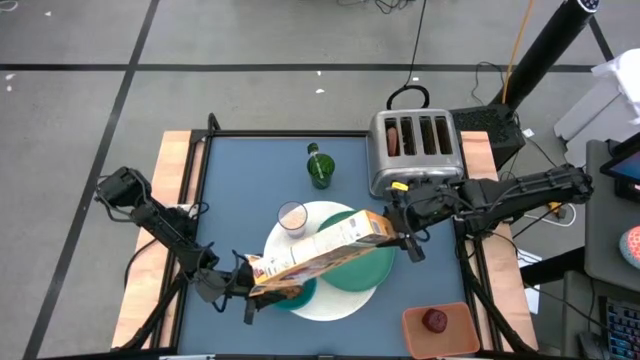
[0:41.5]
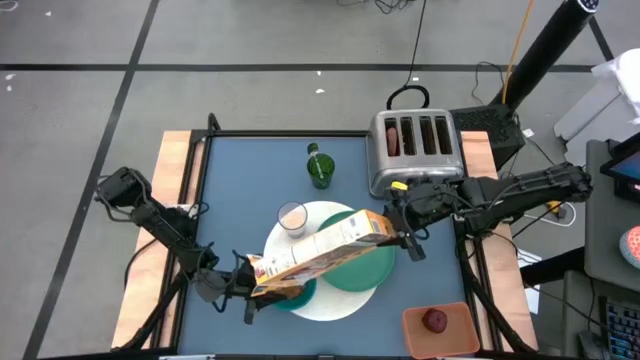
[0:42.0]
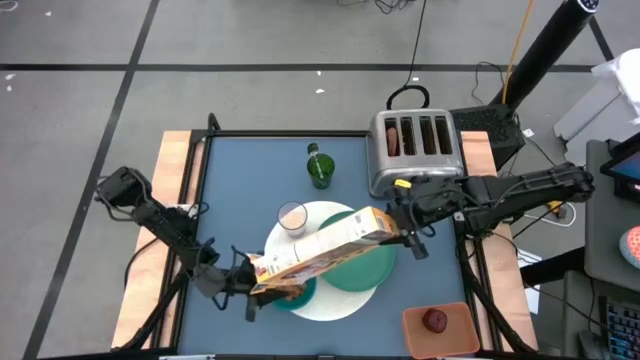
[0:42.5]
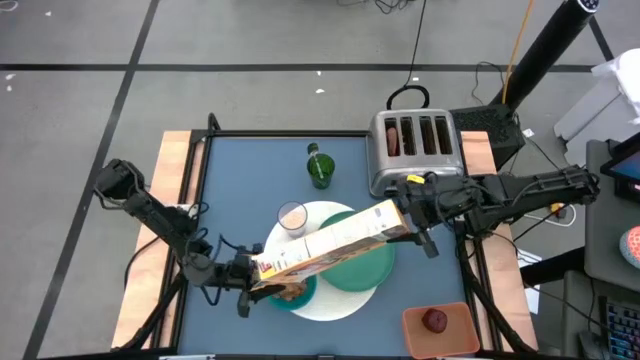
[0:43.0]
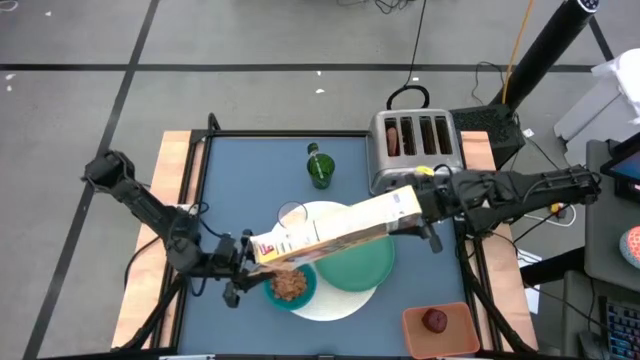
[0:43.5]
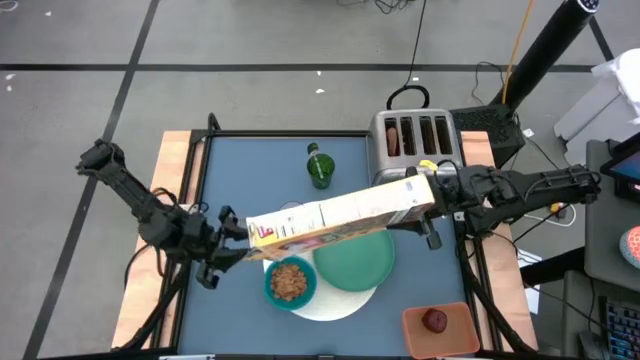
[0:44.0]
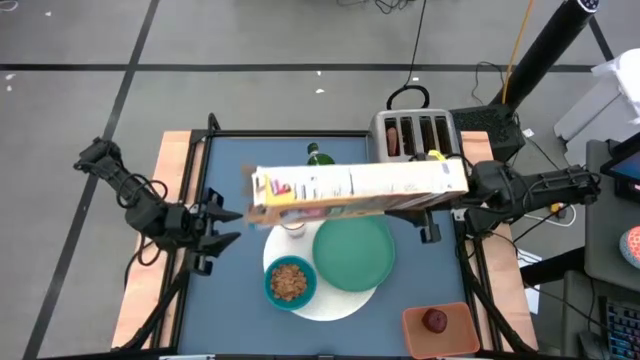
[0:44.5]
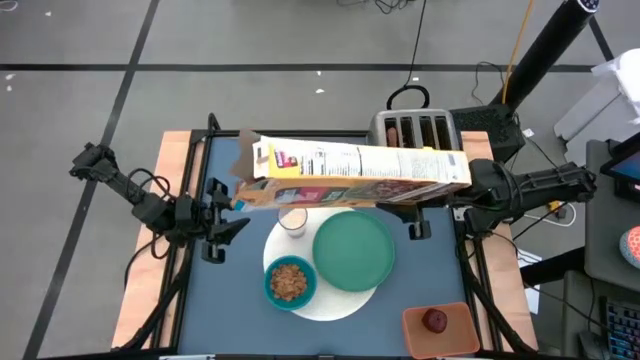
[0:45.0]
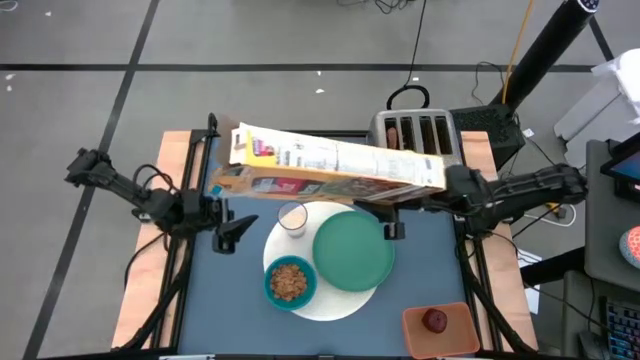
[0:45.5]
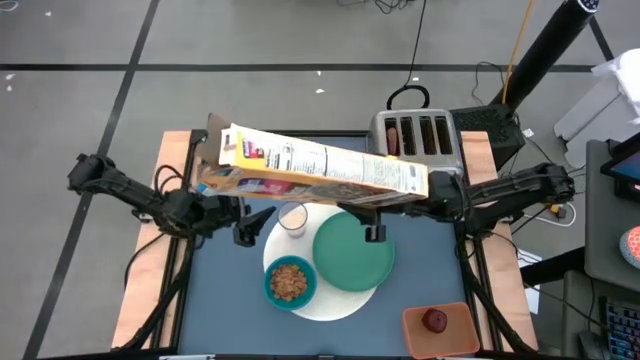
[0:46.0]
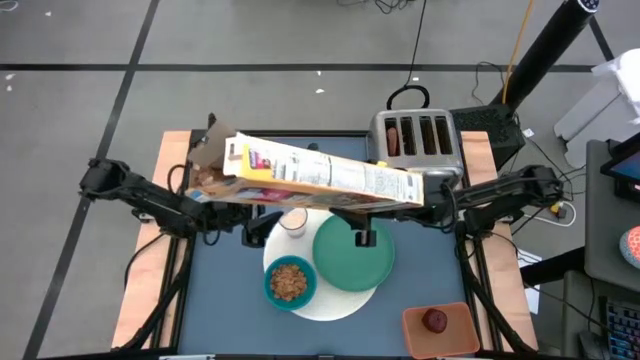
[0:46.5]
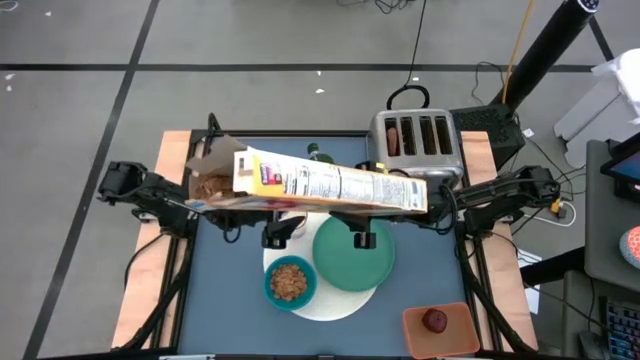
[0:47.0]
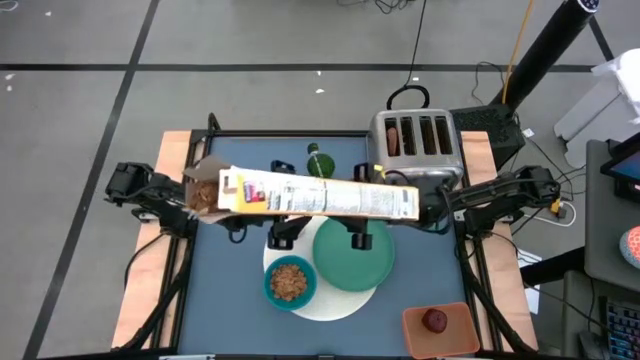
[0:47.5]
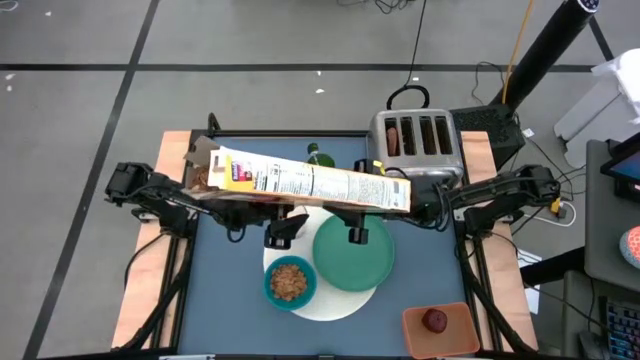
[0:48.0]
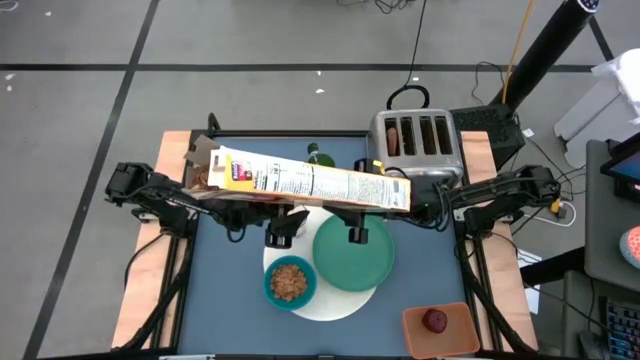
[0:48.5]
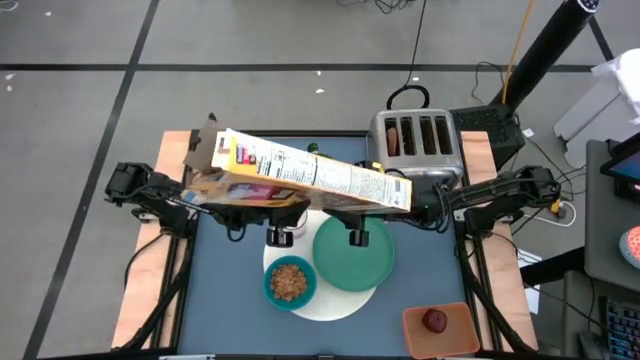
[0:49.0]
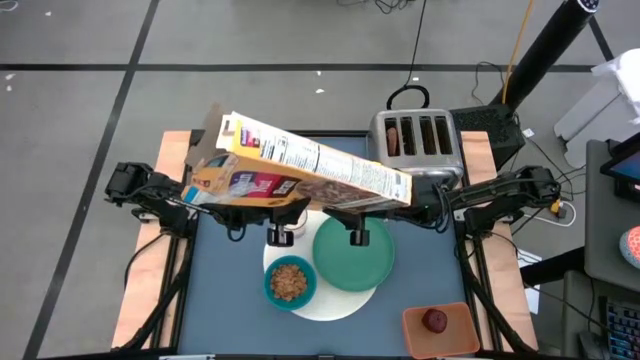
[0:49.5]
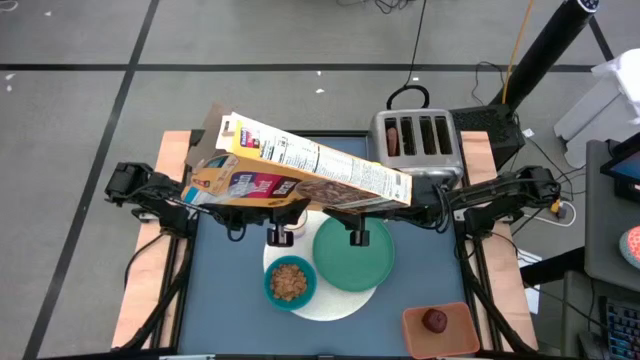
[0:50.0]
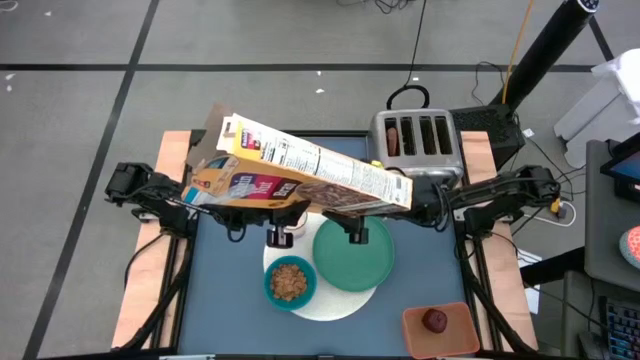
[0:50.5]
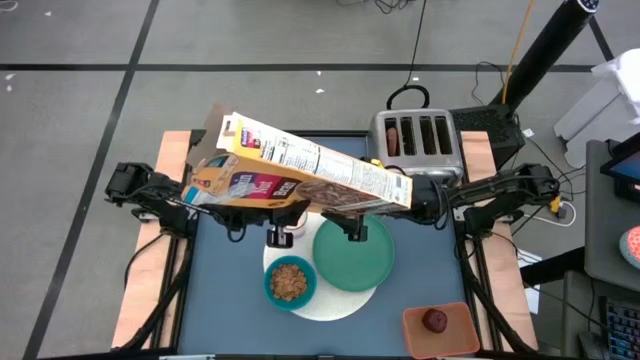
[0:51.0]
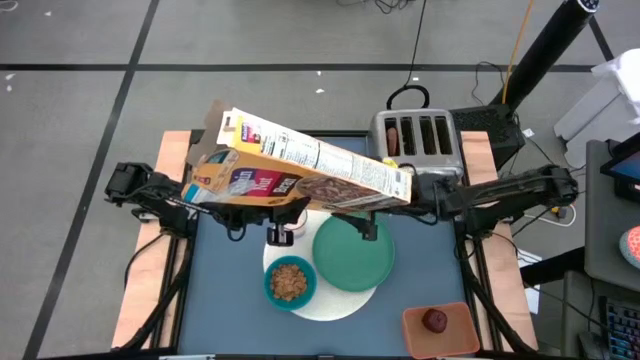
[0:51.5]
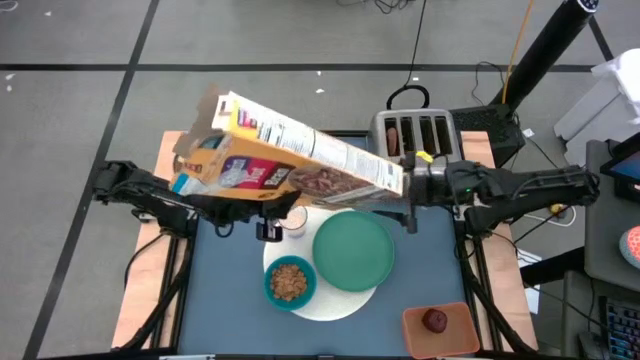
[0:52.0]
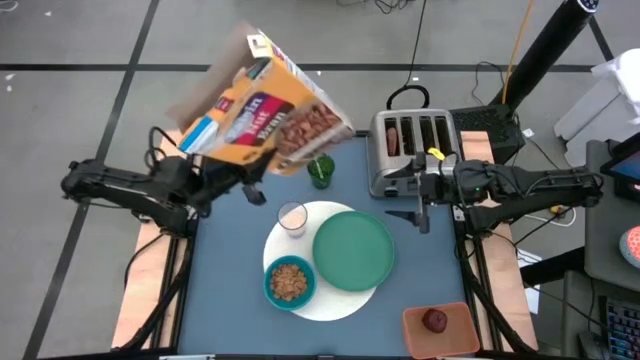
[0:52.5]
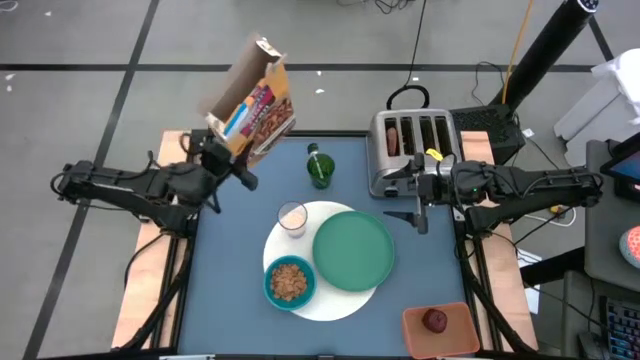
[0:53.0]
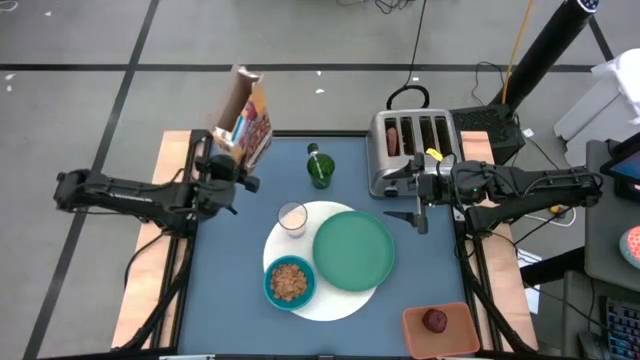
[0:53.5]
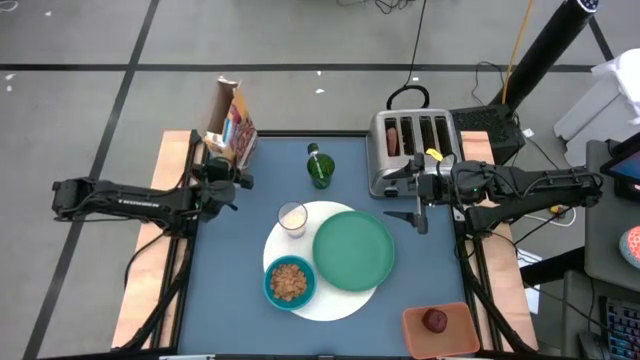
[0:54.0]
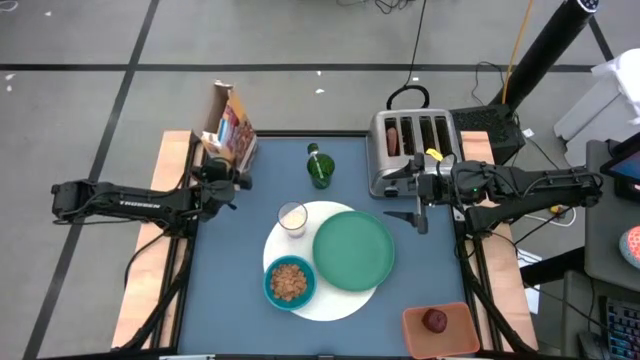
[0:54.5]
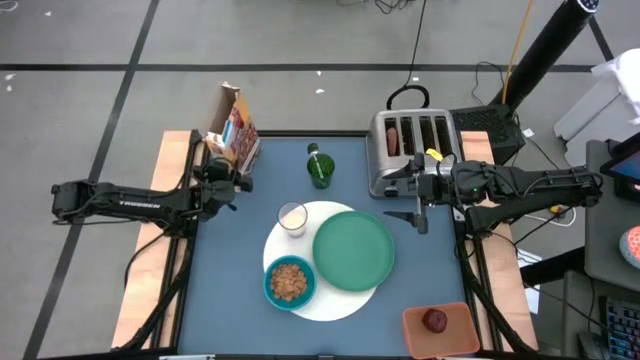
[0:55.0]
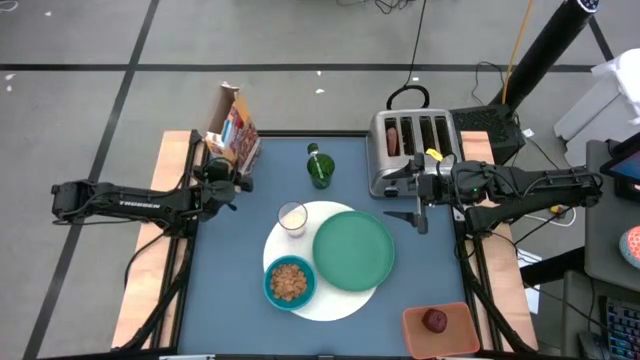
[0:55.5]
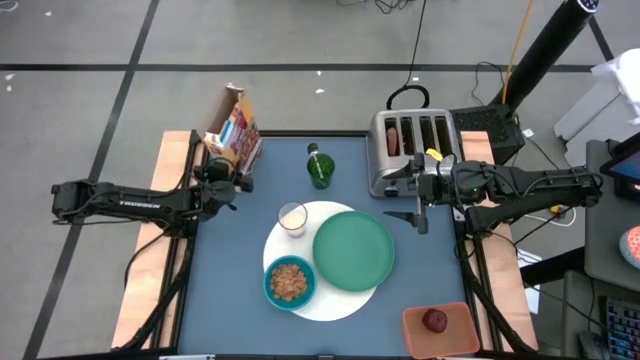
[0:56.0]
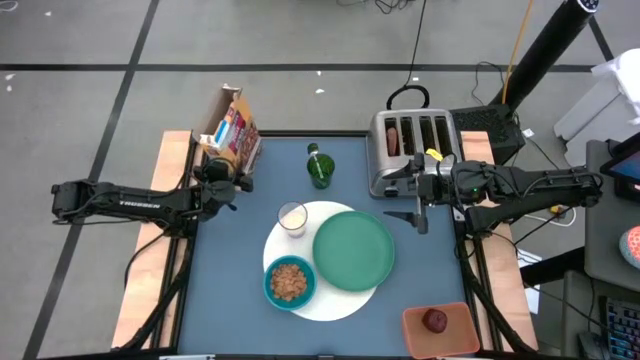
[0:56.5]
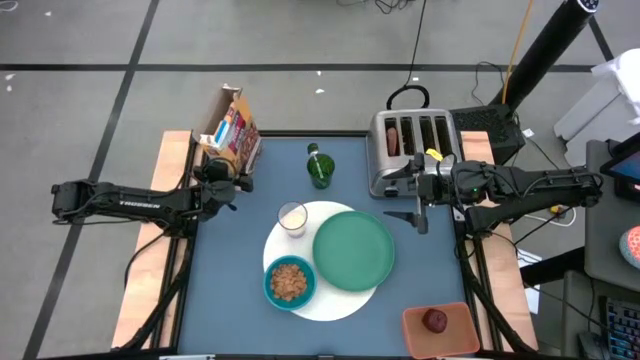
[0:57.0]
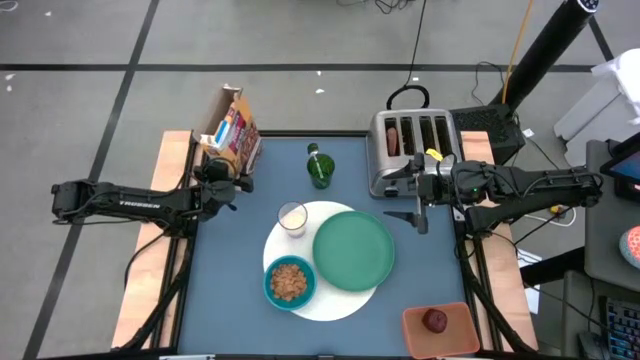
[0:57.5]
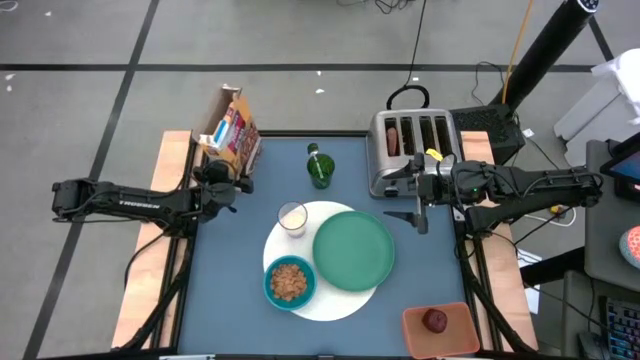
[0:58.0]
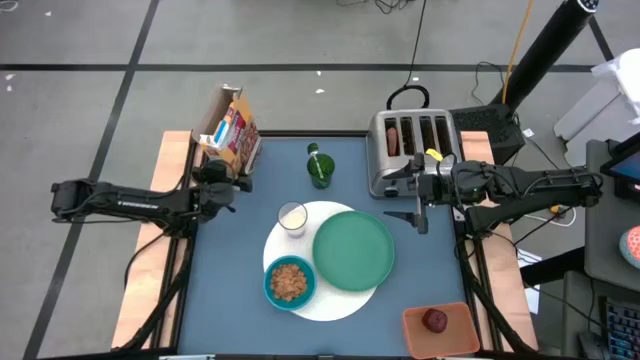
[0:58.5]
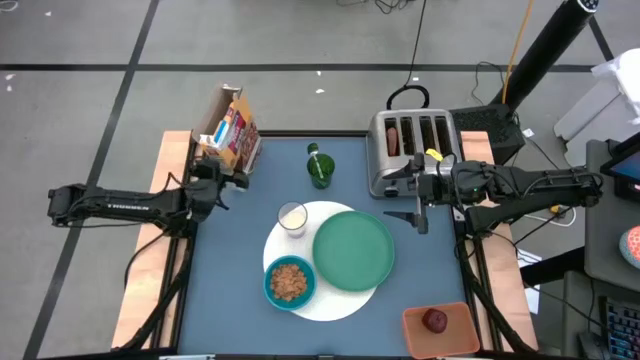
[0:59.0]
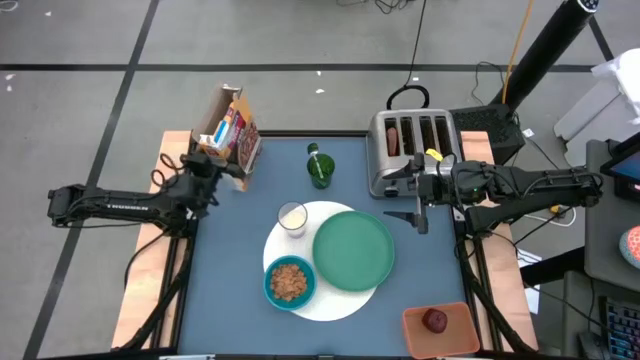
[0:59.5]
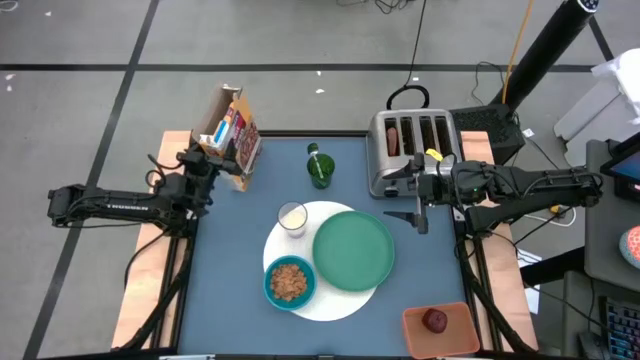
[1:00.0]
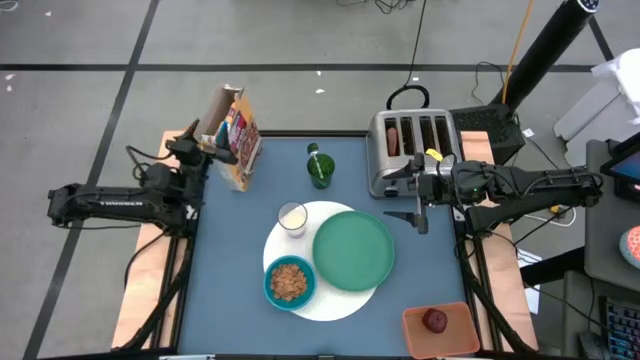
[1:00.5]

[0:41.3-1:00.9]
Task: Arrange a breakfast setting
Pour the cereal from the cereal box into the blue bowl
